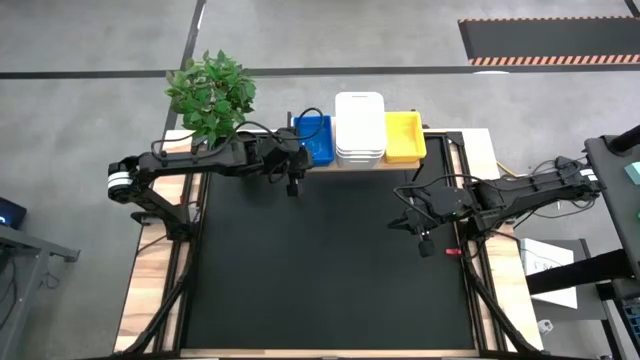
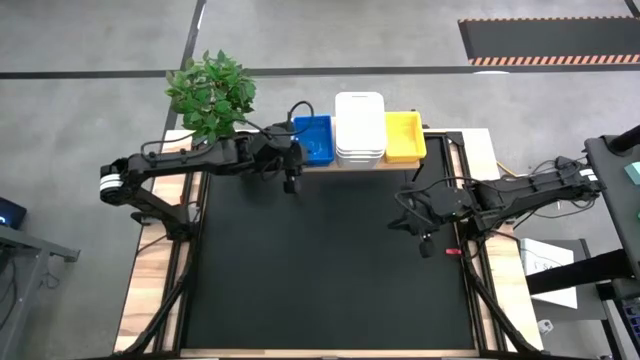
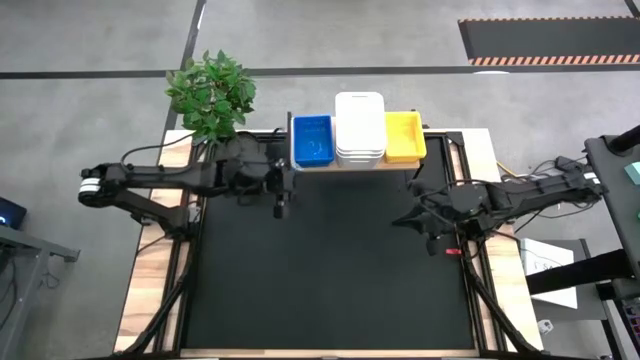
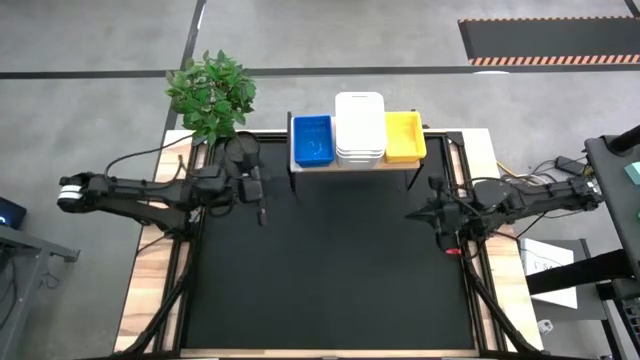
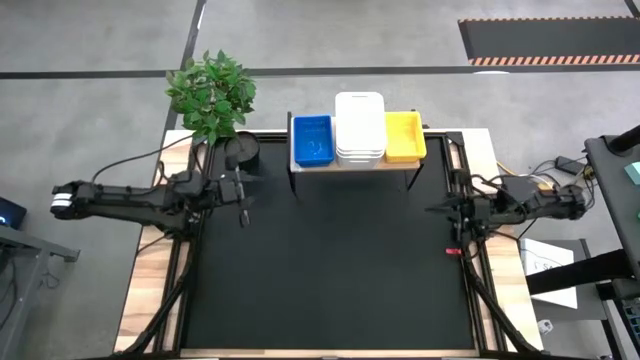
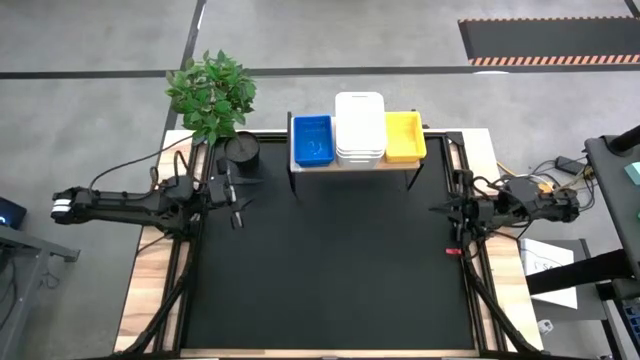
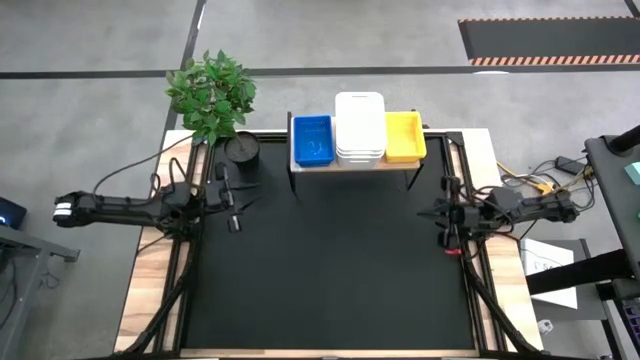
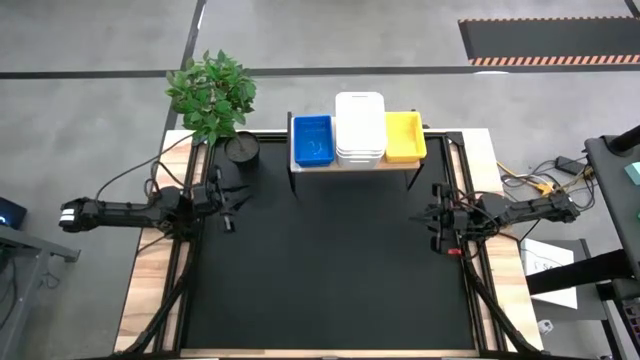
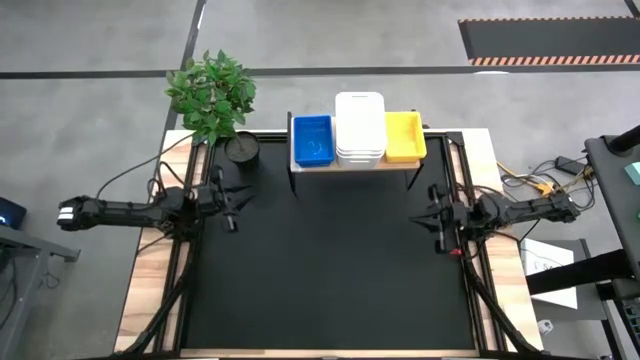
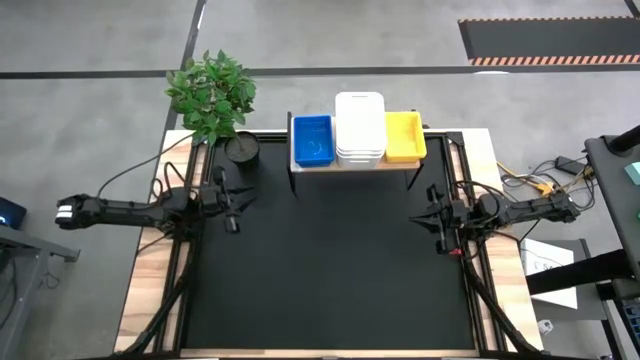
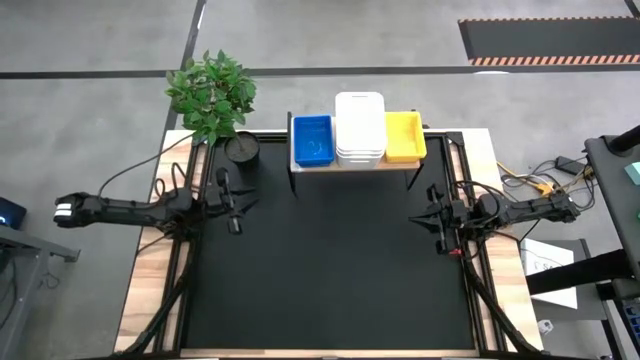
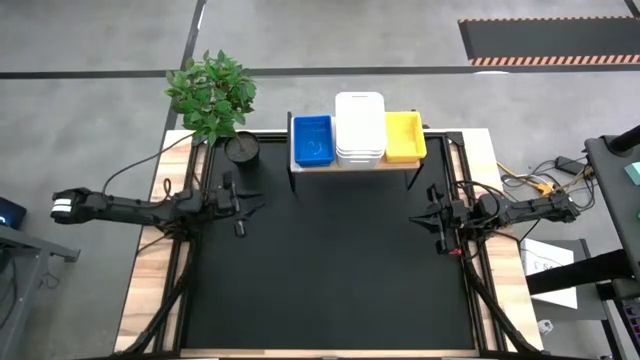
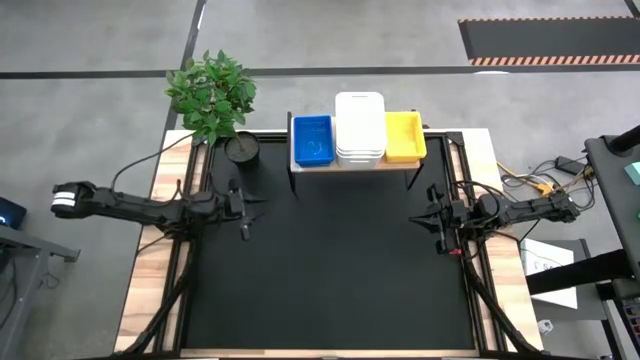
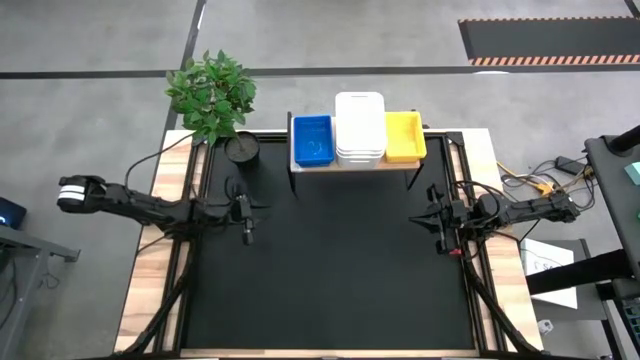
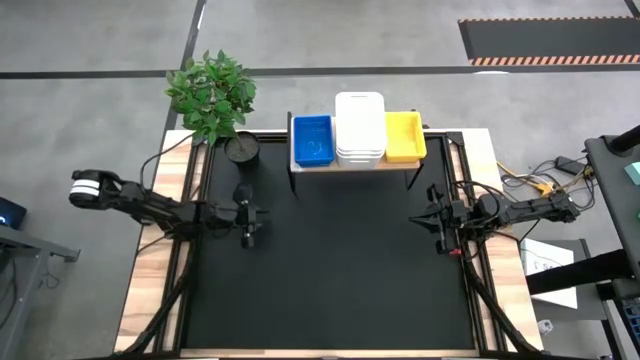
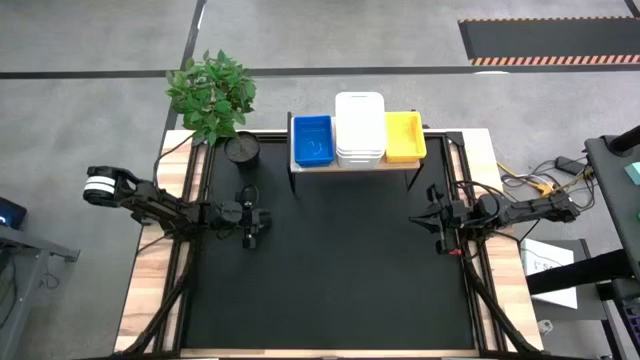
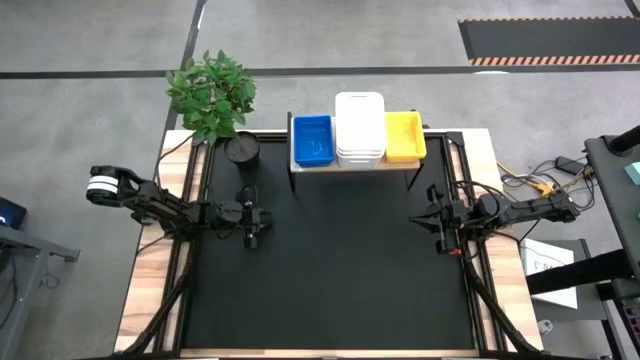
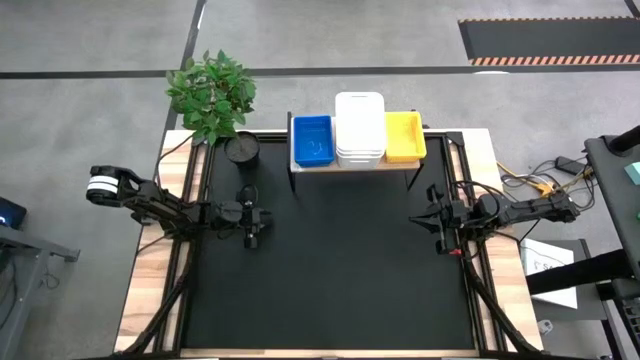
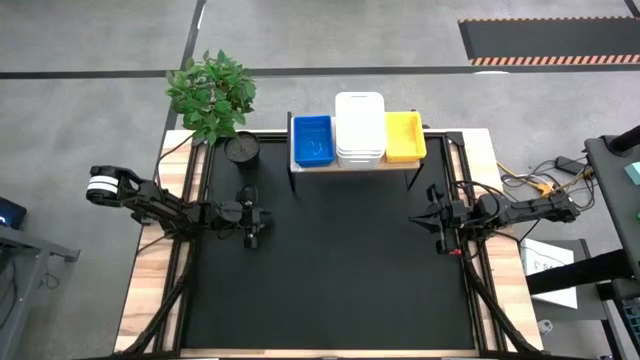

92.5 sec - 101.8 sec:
Task: Stack baskets on shelf by color
Return to Home Position

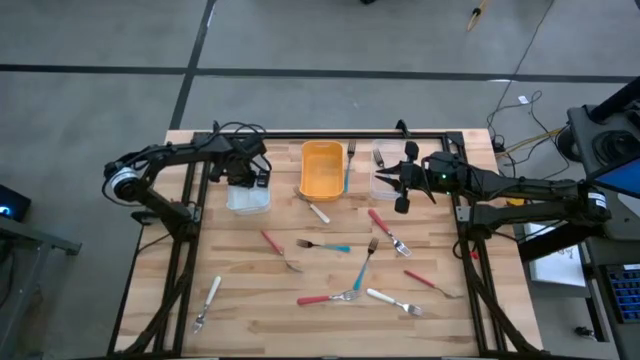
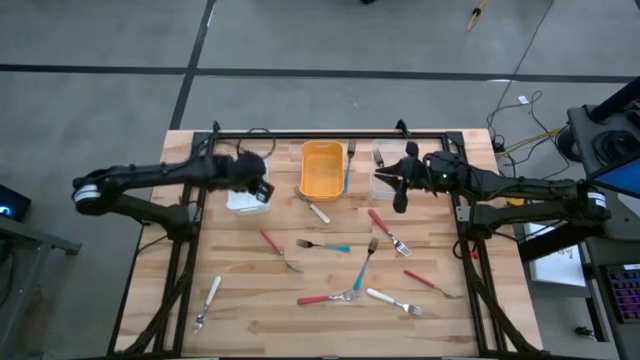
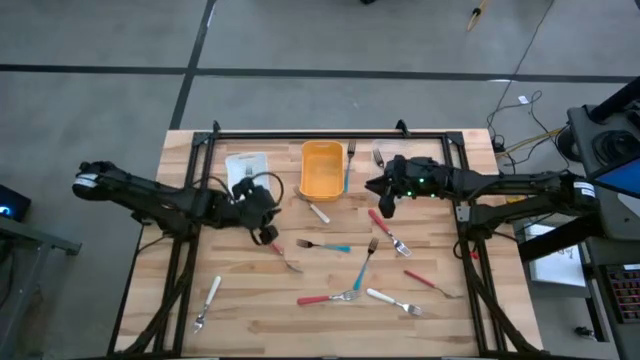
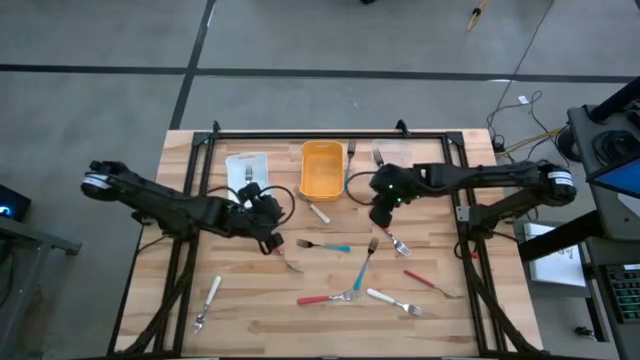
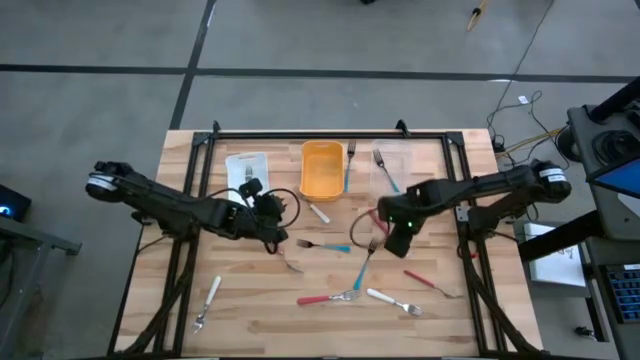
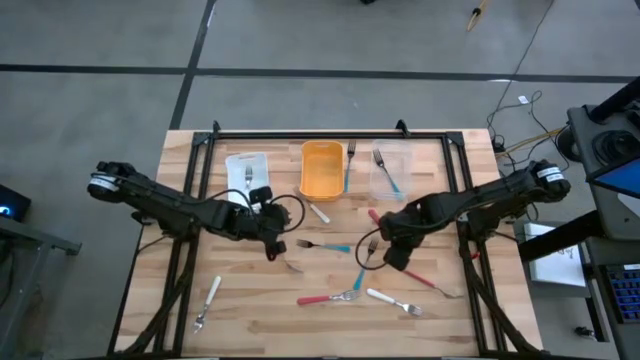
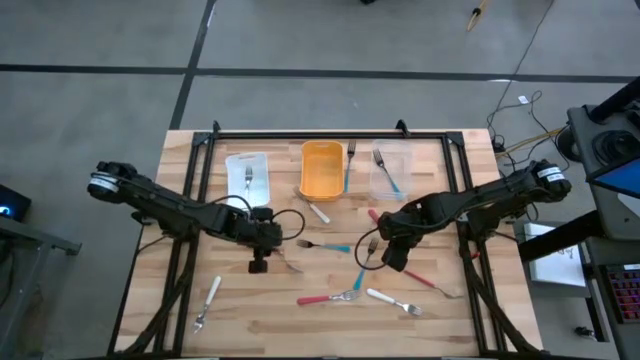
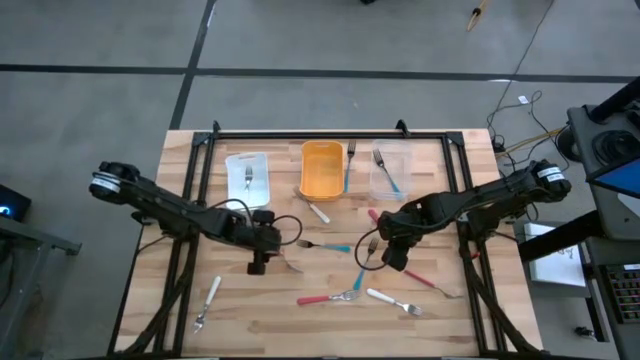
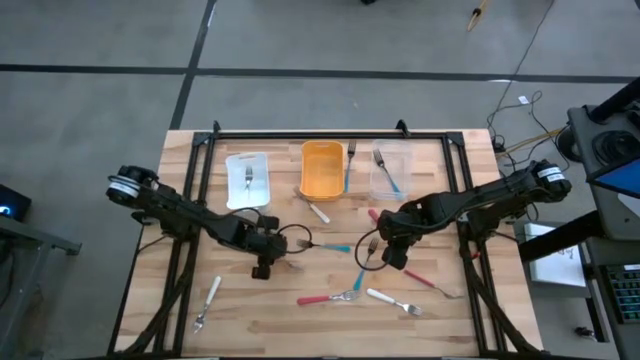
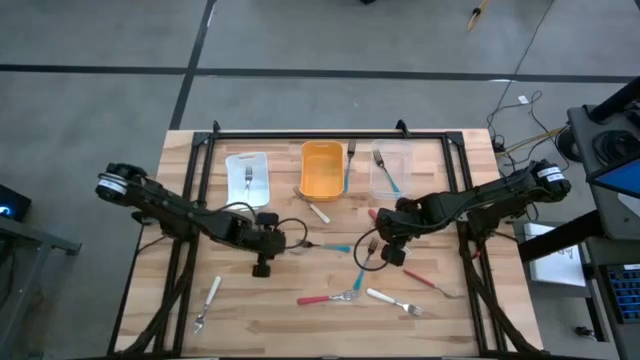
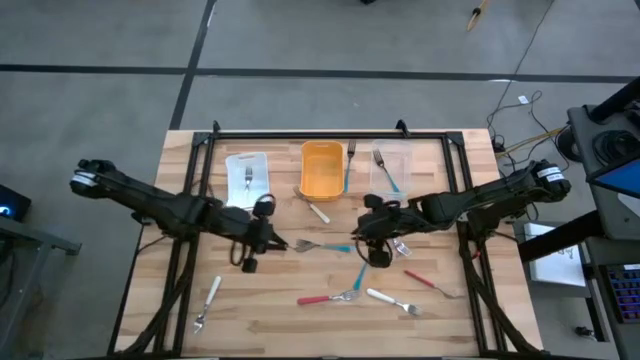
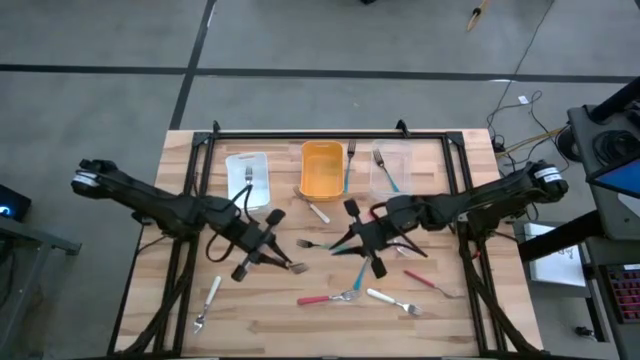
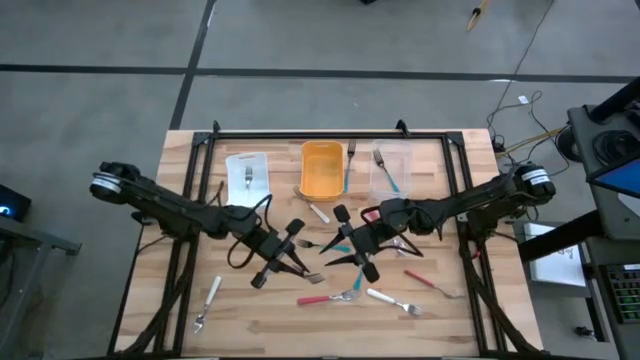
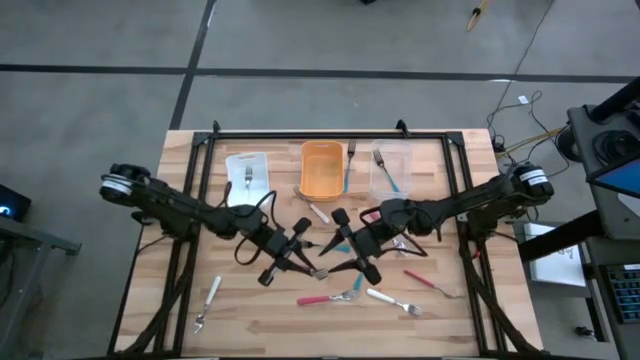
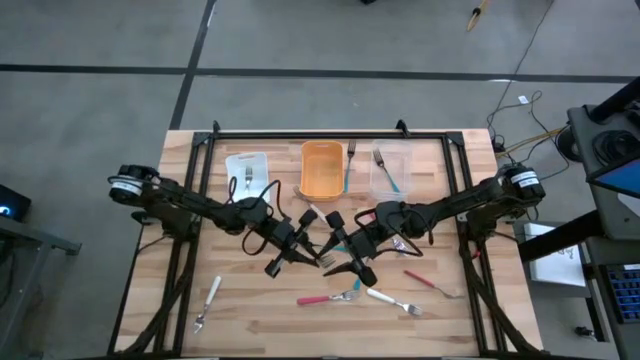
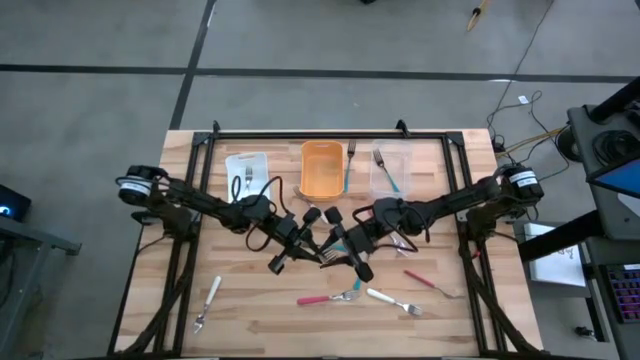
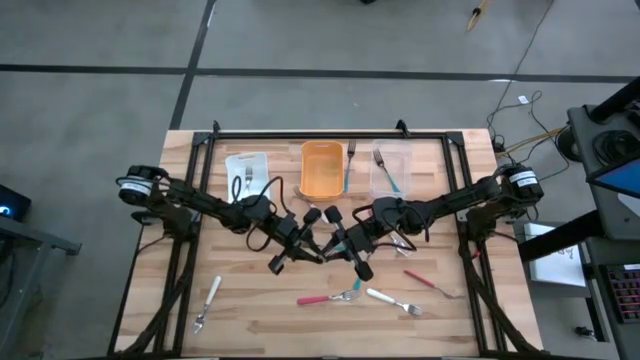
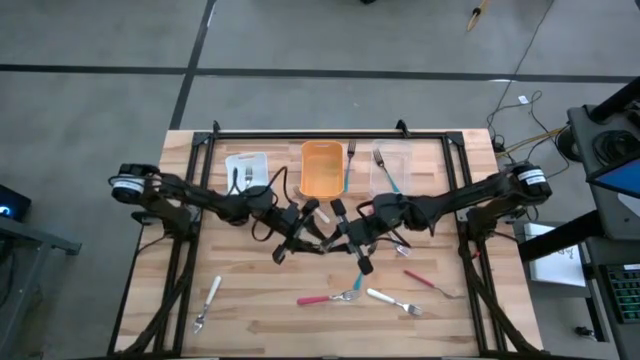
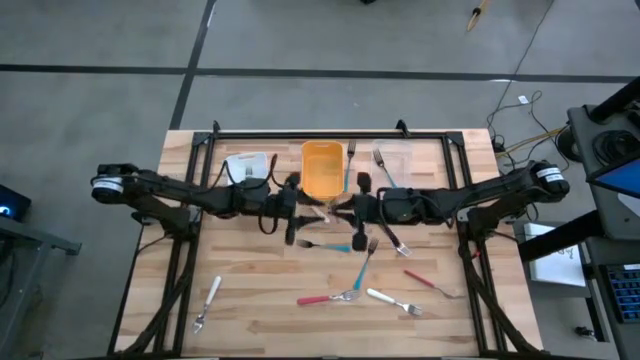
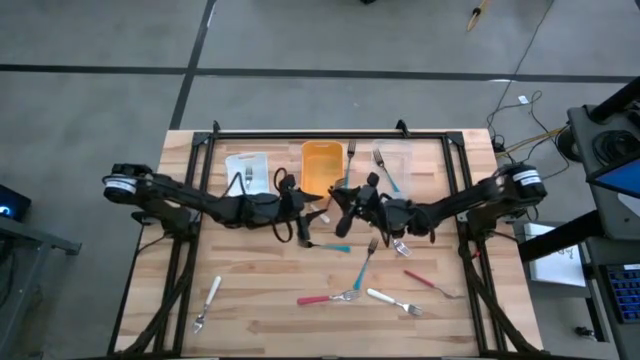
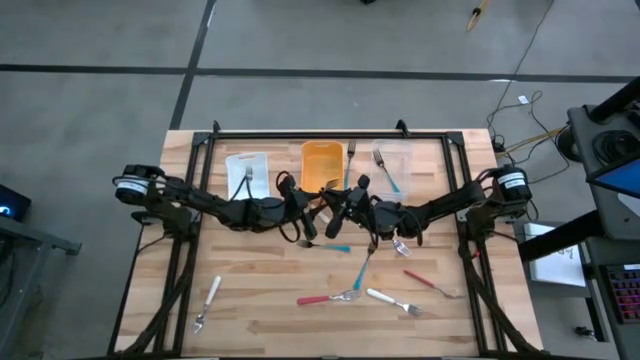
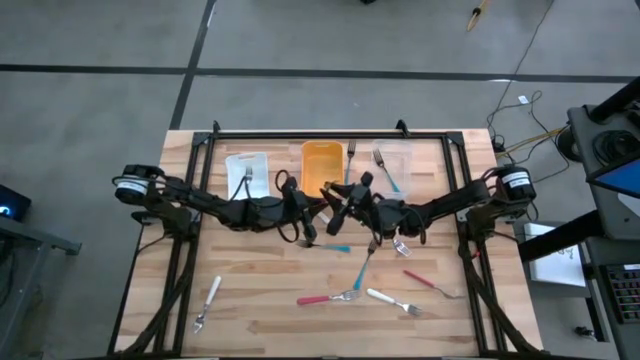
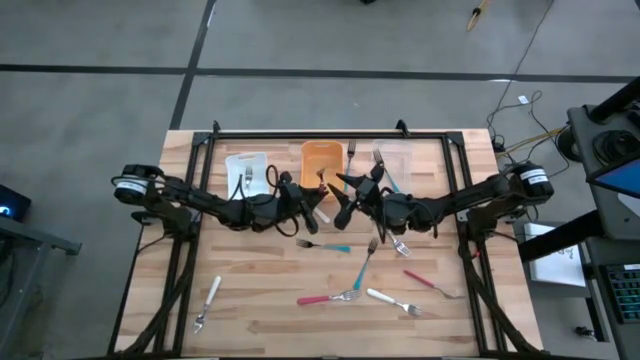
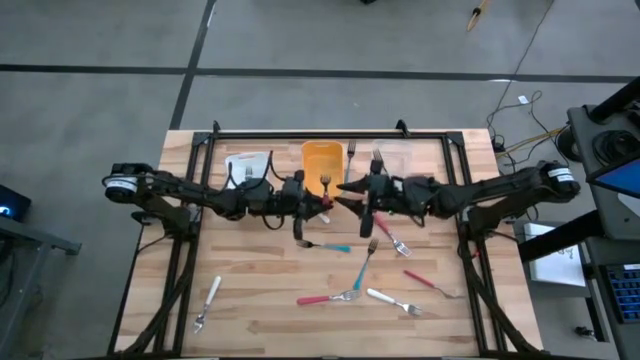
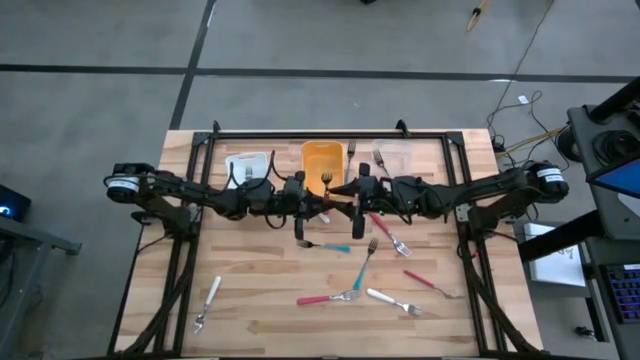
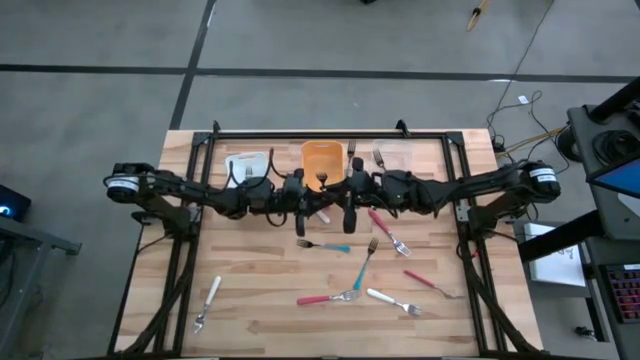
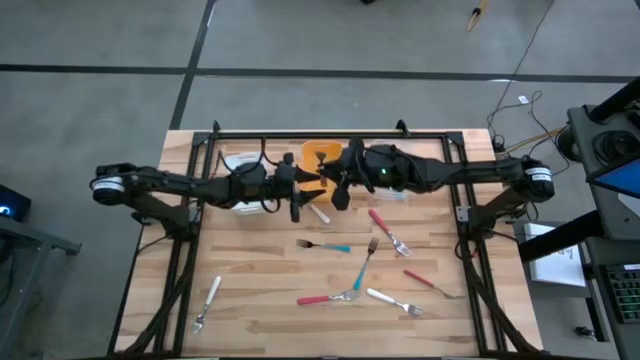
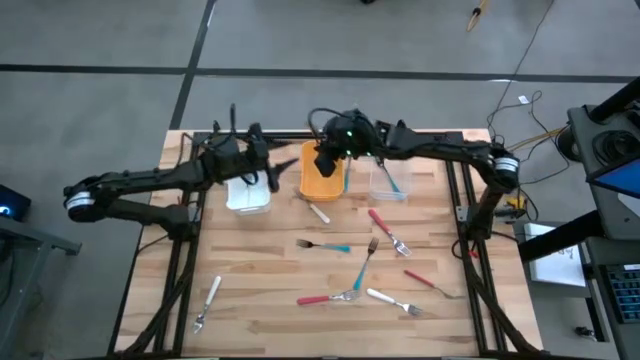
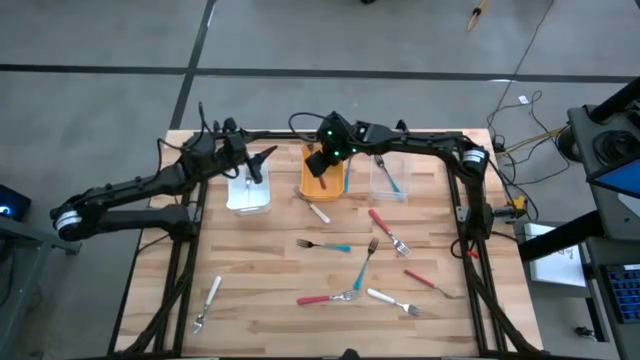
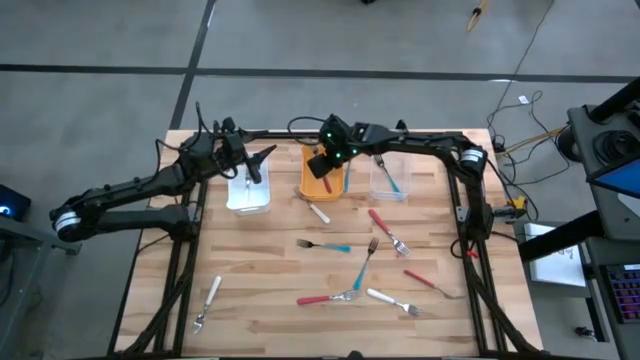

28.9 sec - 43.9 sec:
Task: Sort silverware by color (type)
Put the pink fork into the yellow bin
